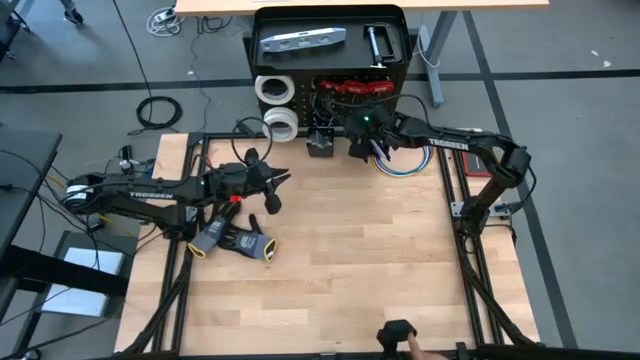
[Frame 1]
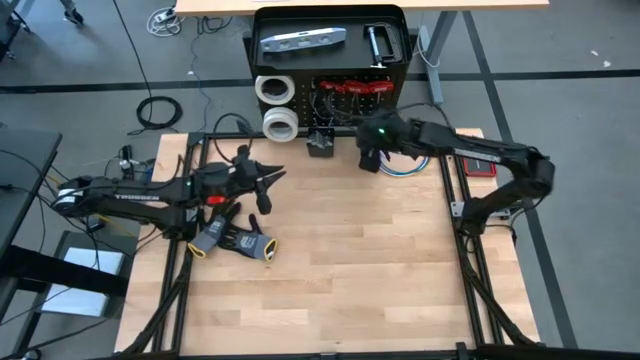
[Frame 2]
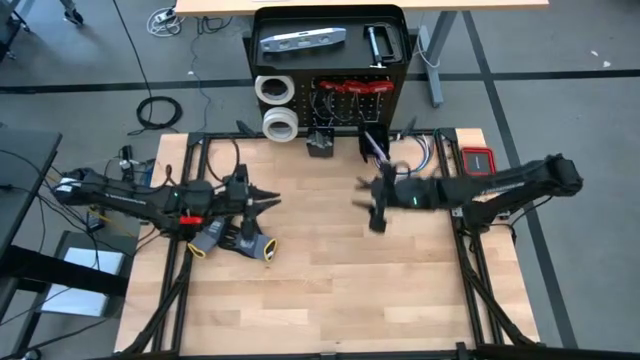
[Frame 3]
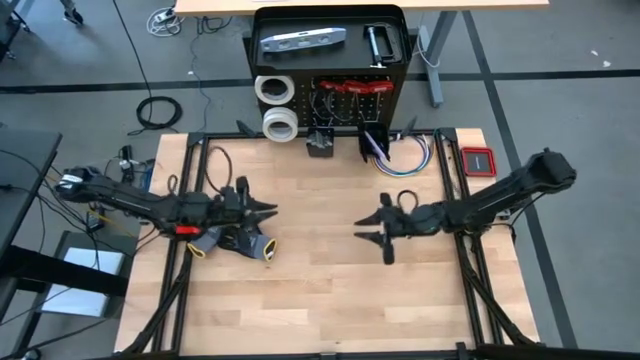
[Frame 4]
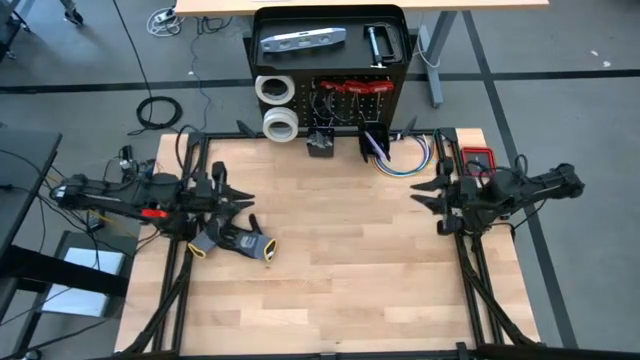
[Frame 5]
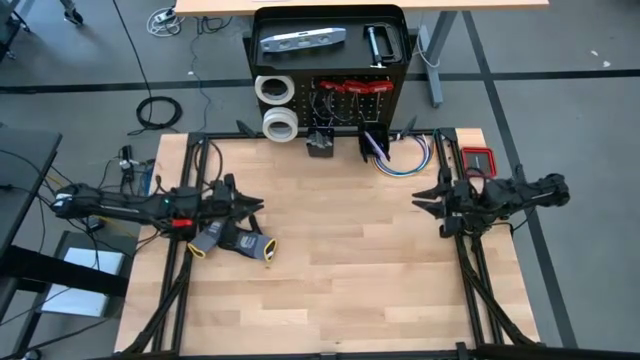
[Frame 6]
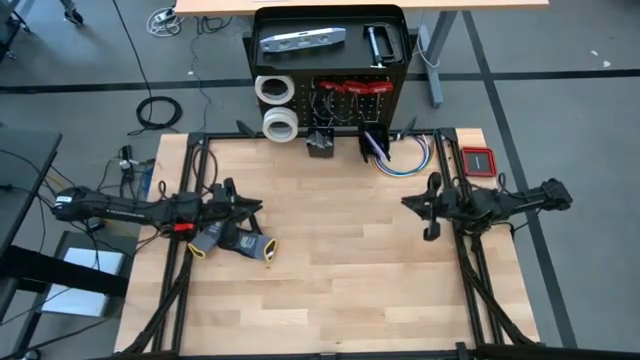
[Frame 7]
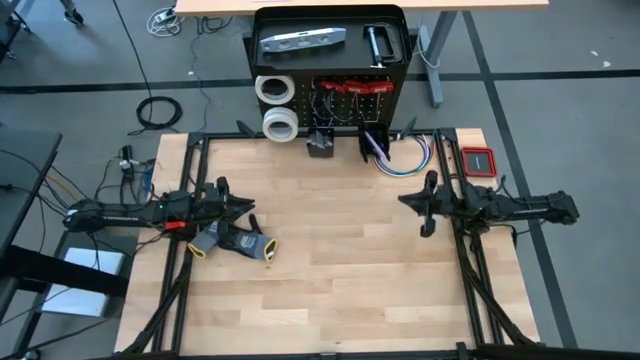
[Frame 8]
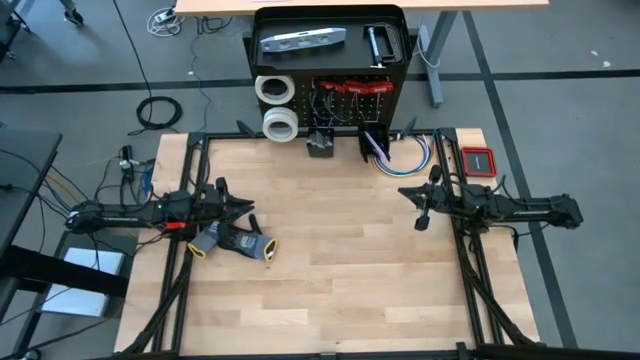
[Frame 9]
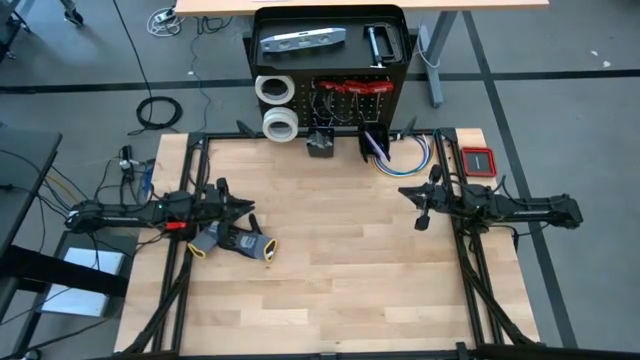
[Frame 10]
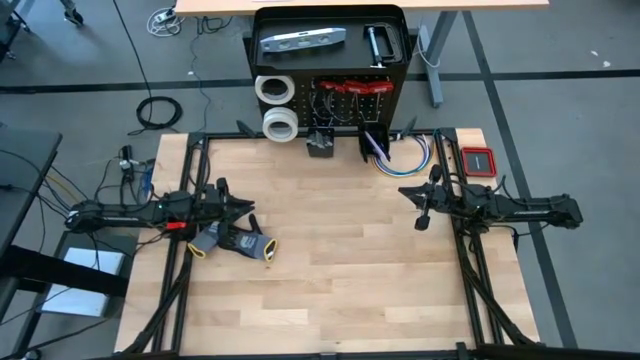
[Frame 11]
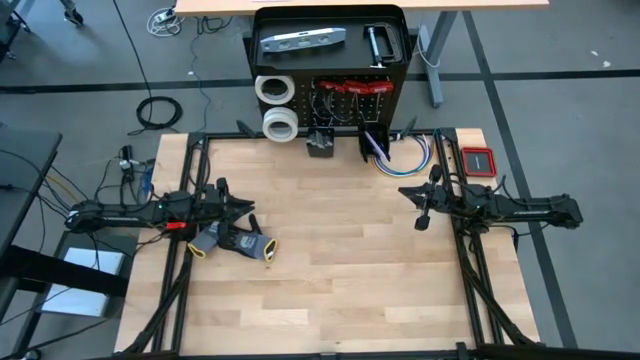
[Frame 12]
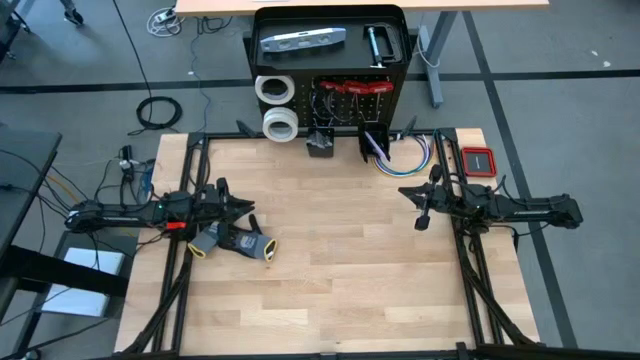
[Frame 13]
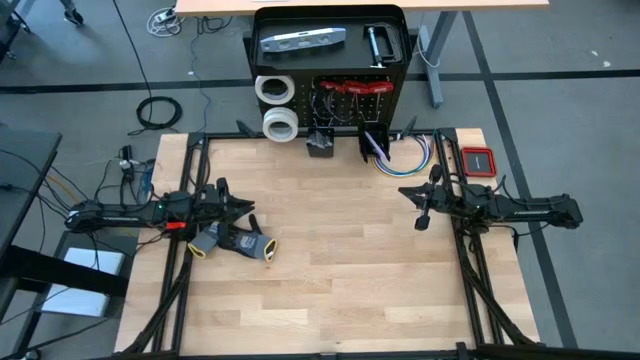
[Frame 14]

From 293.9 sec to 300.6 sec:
Task: Hang tools onto peg board
Return to Home Position

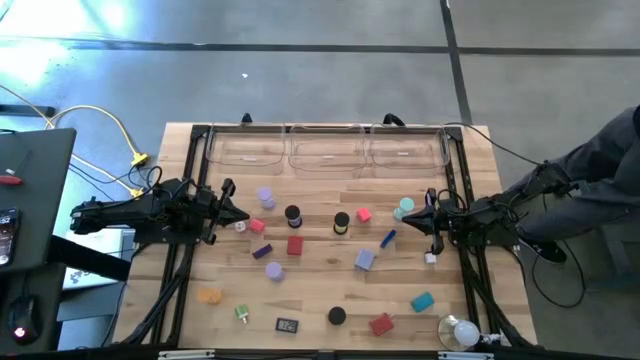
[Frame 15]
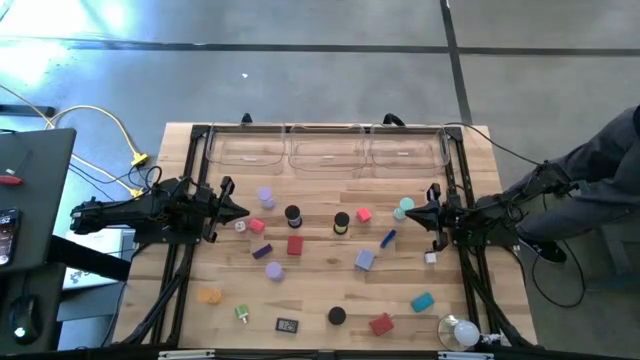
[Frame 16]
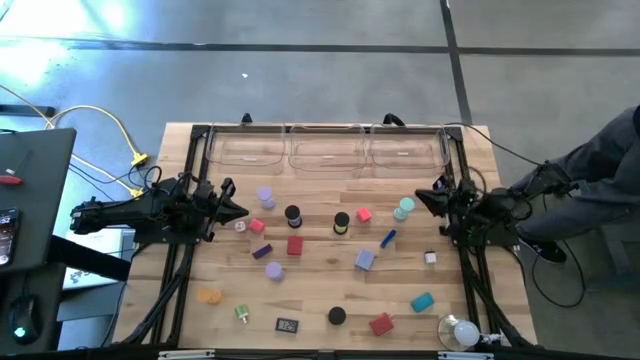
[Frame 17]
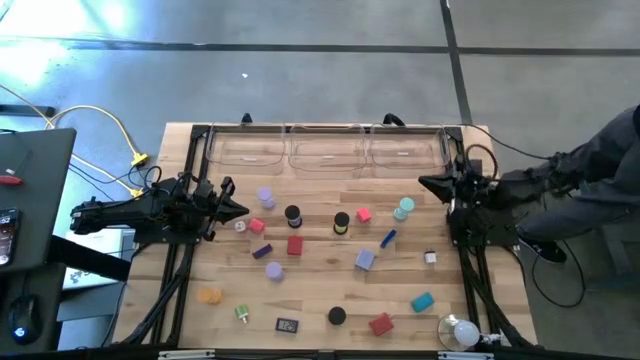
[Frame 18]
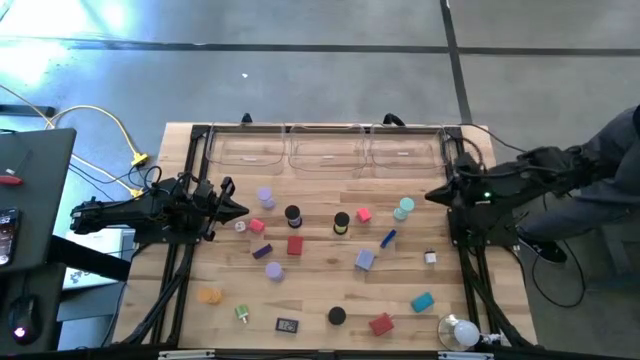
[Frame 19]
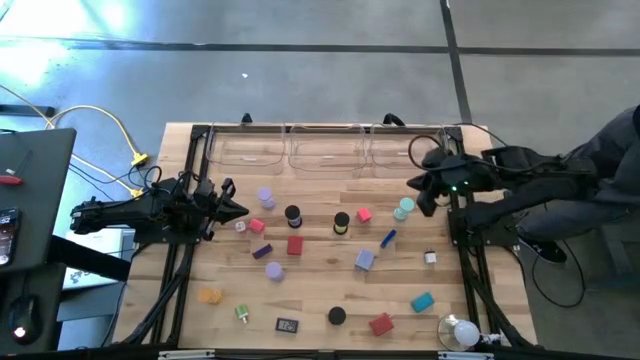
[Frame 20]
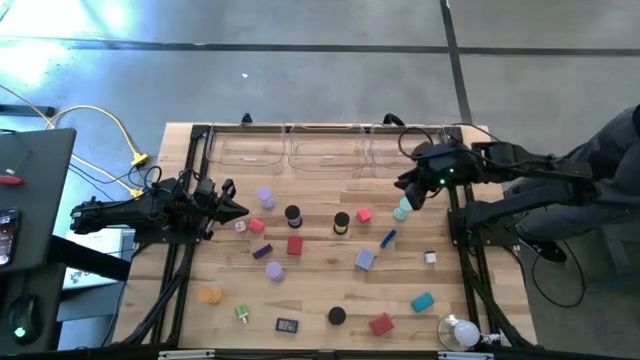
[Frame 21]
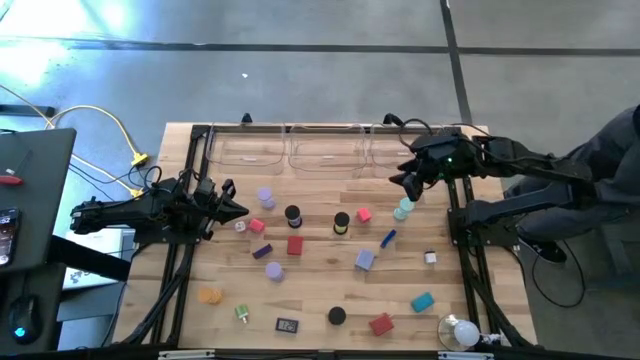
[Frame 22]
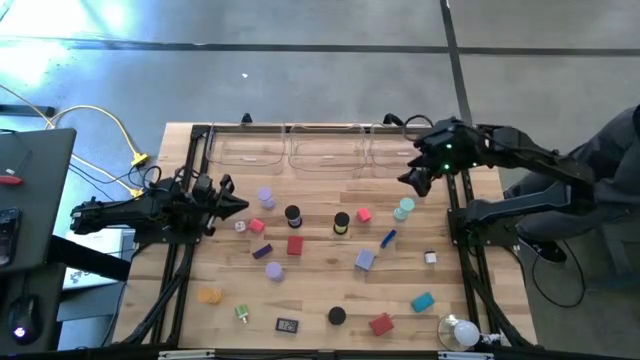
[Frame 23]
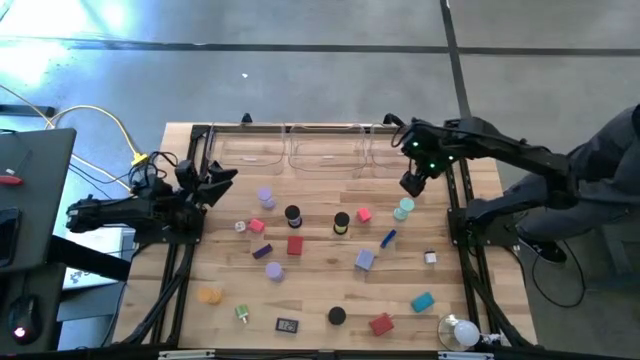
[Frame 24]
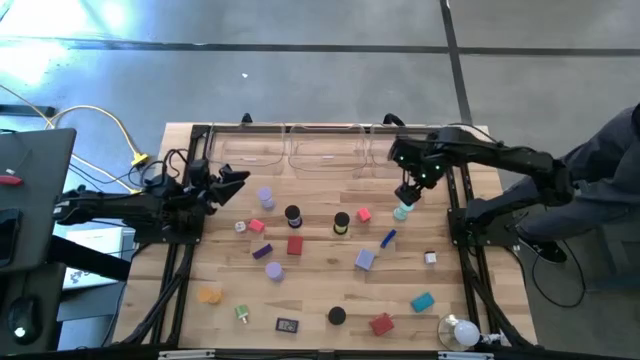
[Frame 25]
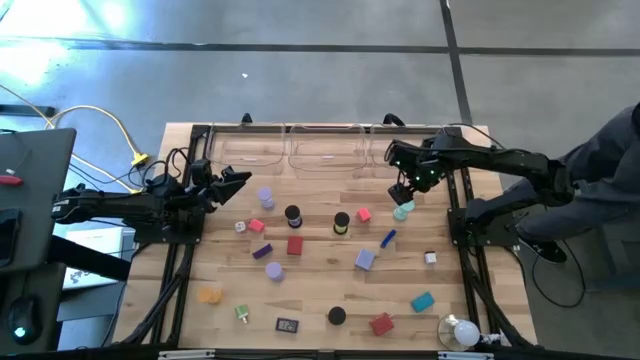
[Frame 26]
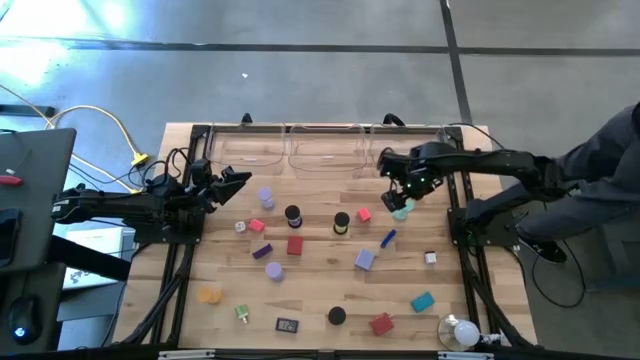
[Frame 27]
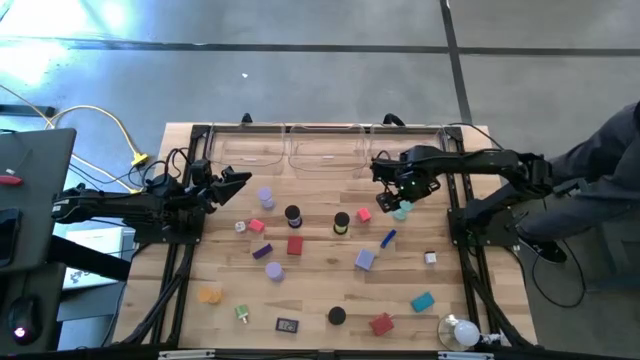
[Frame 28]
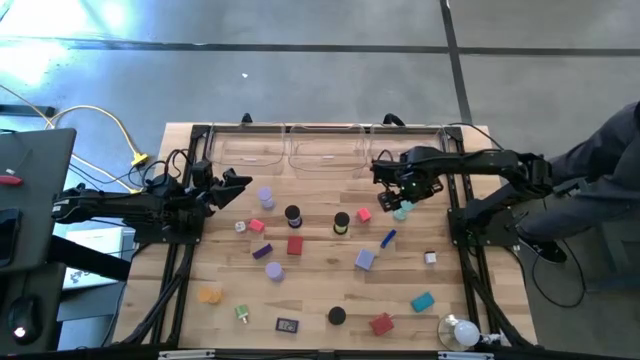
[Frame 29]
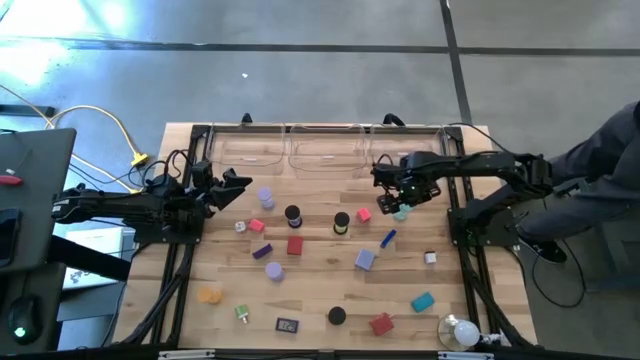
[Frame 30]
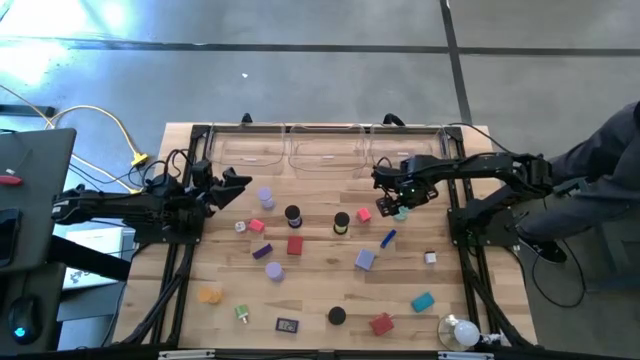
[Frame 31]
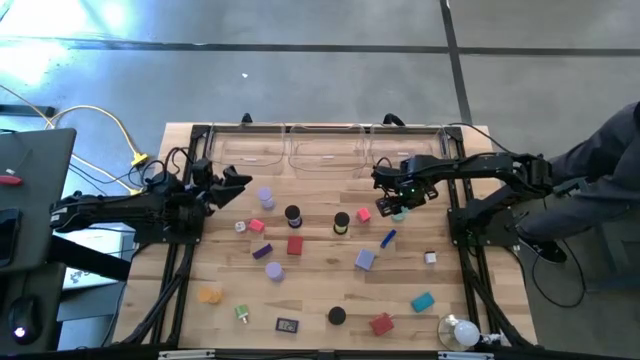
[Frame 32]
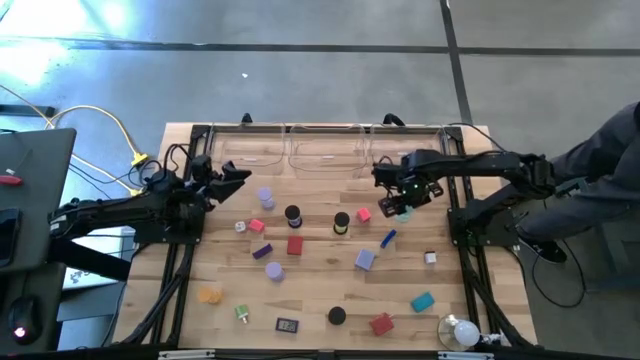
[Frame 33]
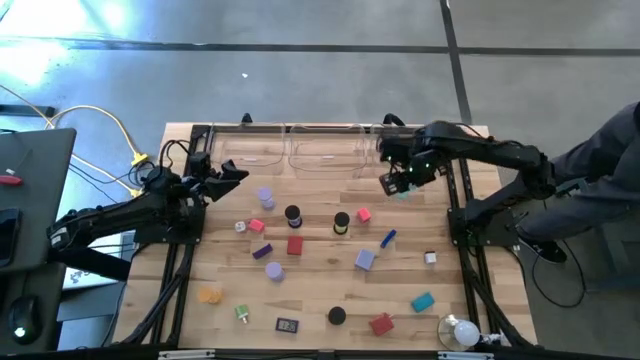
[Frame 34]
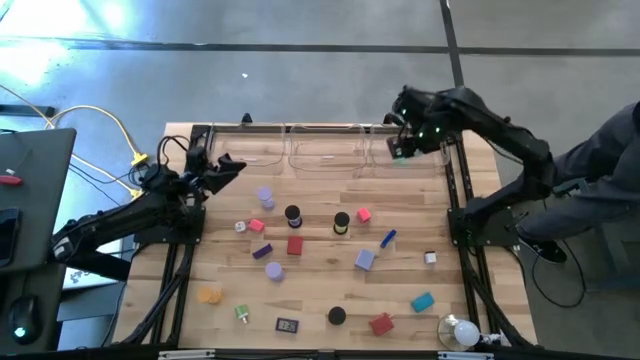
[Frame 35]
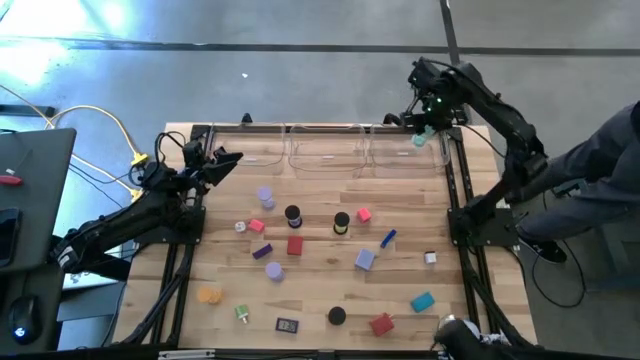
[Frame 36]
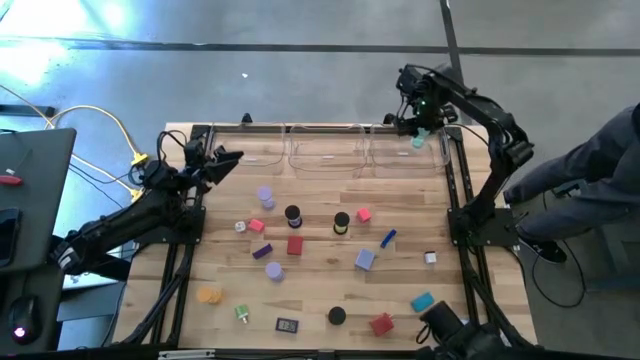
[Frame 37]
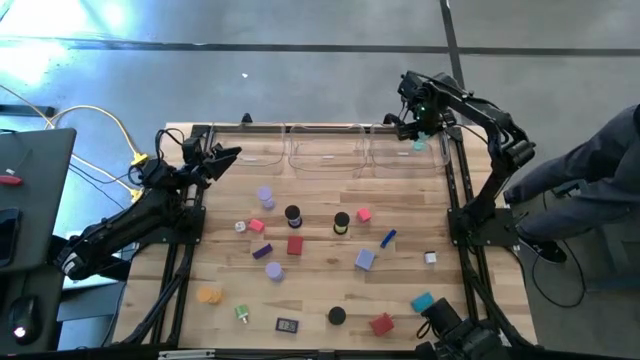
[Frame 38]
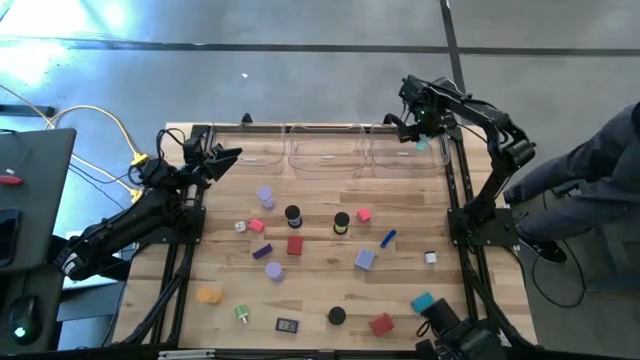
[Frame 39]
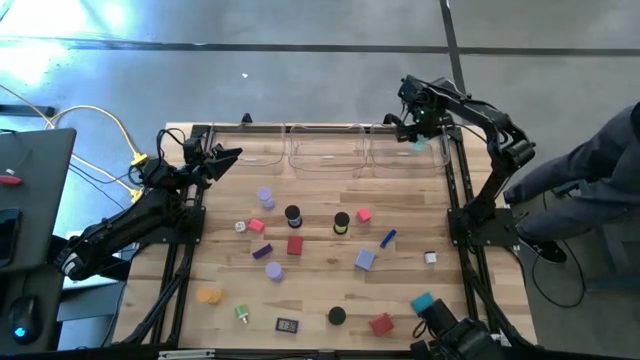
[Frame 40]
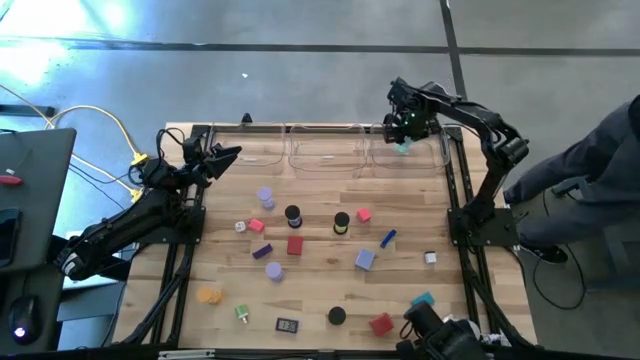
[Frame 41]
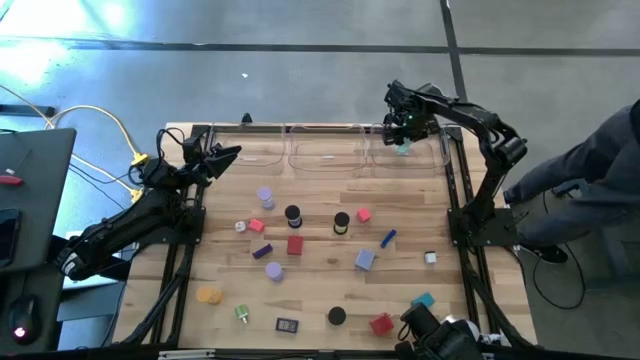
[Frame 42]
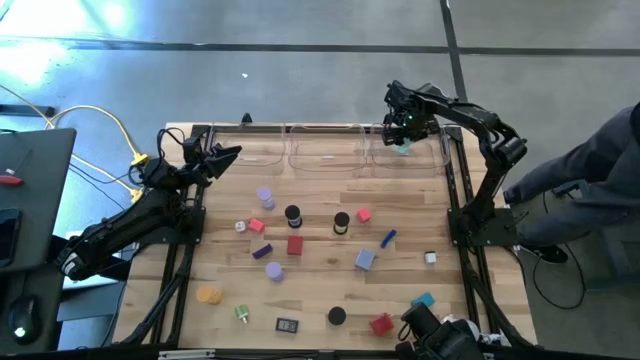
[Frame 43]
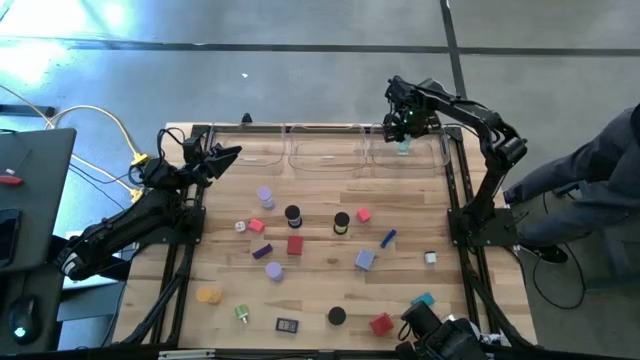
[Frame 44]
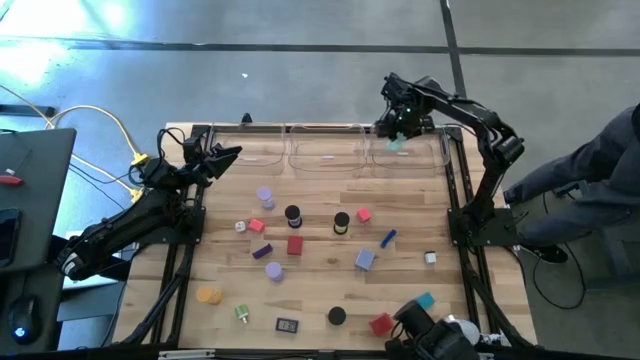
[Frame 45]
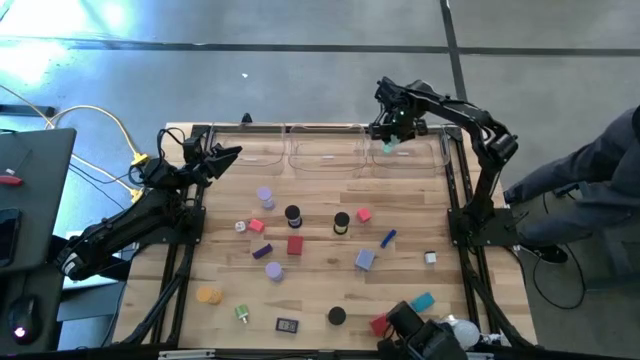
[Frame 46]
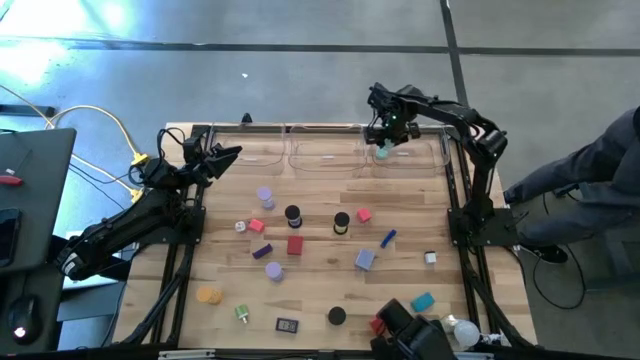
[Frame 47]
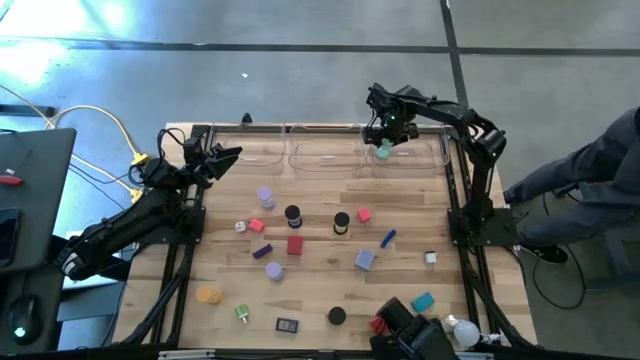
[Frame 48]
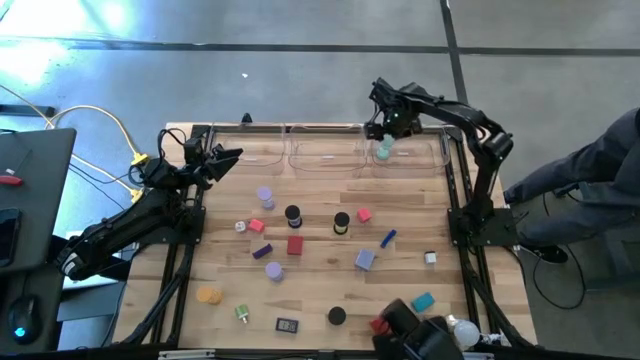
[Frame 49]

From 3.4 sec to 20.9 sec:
Task: Pick & Place Office items
Put the light blue hourglass into the right transparent bin
